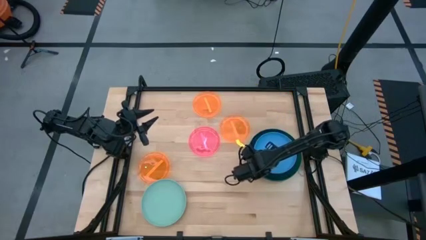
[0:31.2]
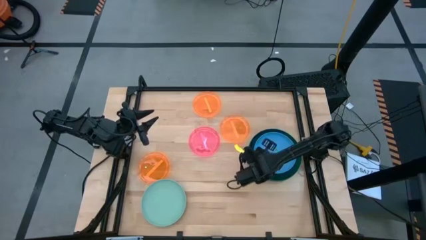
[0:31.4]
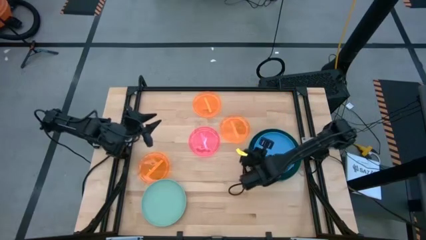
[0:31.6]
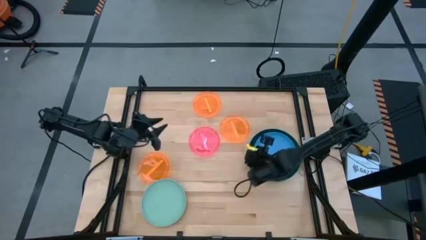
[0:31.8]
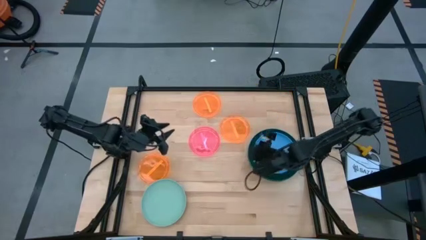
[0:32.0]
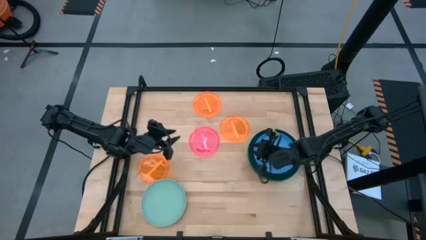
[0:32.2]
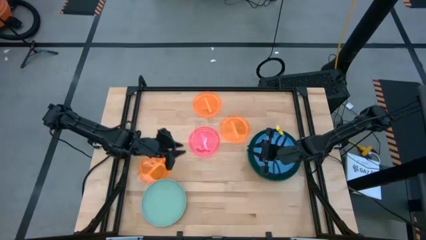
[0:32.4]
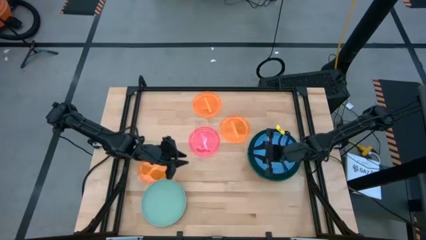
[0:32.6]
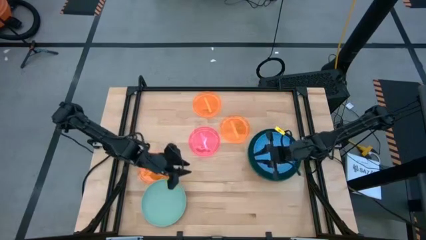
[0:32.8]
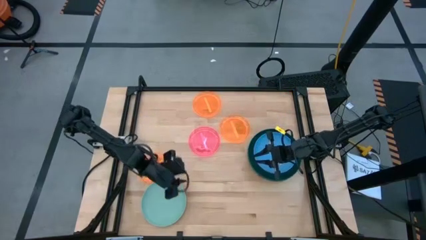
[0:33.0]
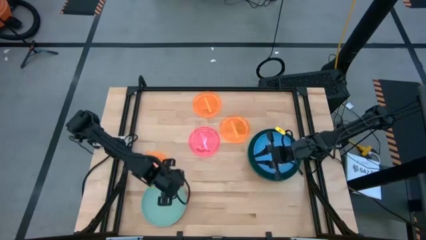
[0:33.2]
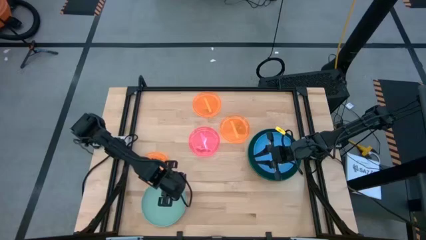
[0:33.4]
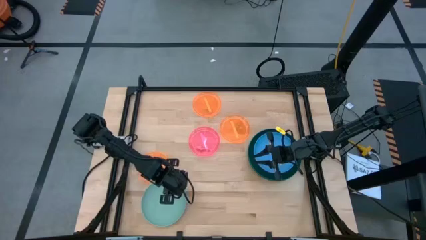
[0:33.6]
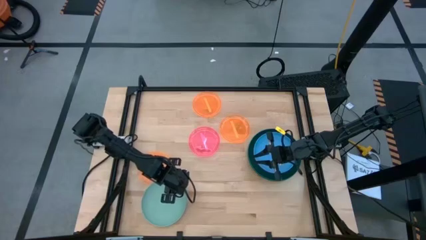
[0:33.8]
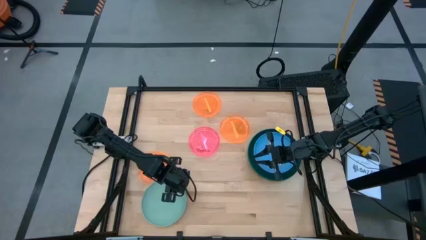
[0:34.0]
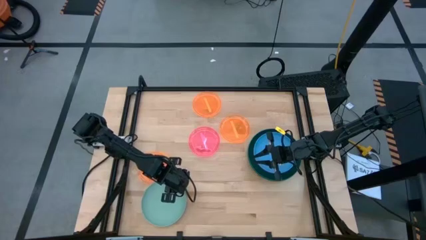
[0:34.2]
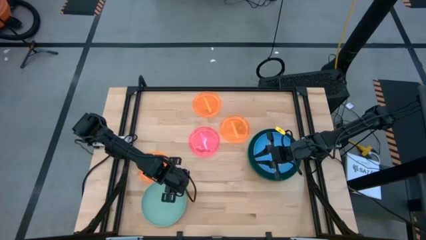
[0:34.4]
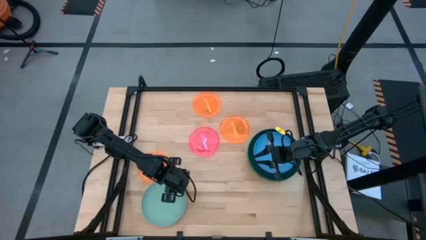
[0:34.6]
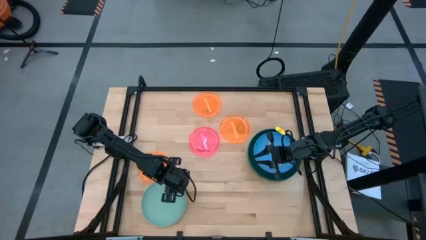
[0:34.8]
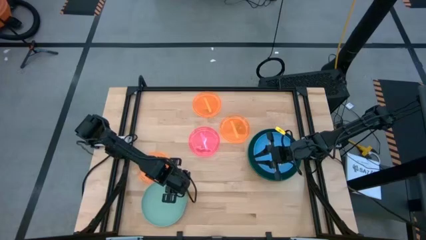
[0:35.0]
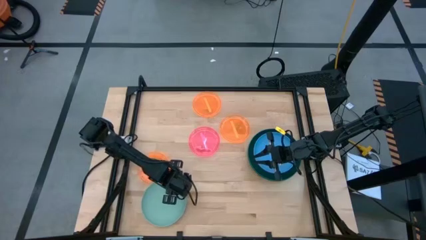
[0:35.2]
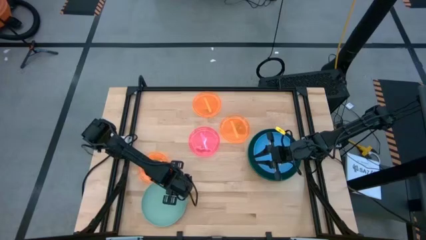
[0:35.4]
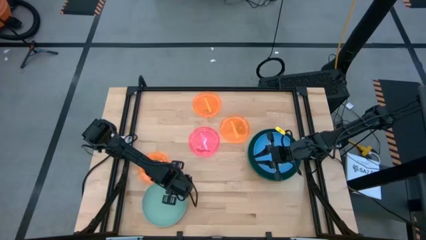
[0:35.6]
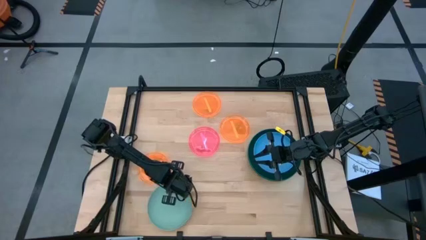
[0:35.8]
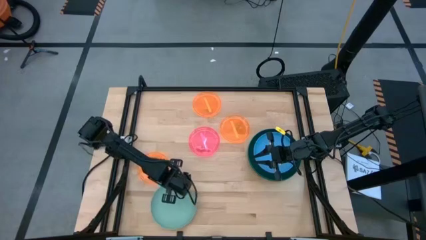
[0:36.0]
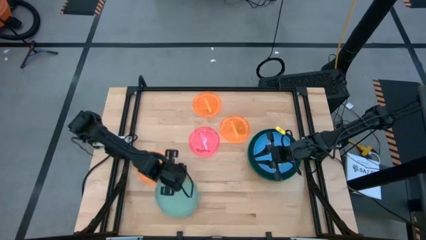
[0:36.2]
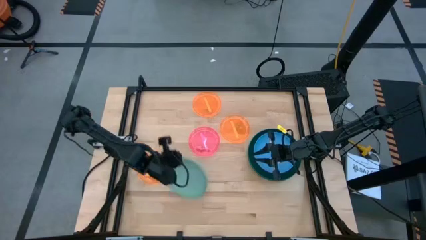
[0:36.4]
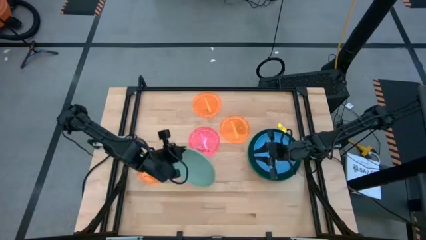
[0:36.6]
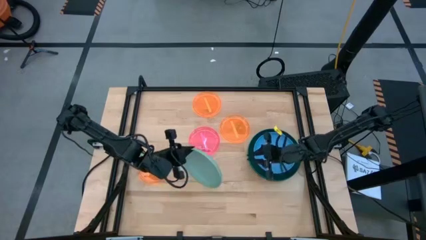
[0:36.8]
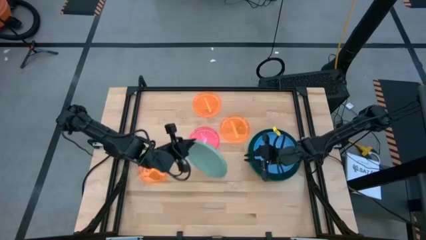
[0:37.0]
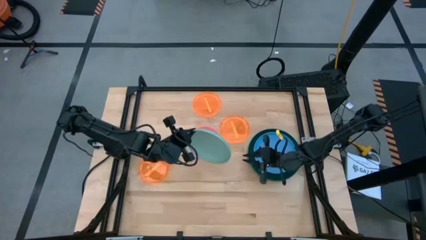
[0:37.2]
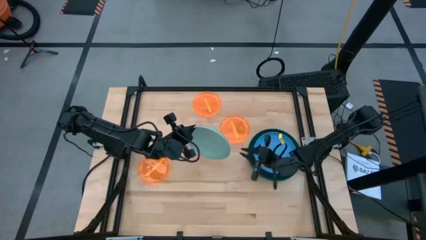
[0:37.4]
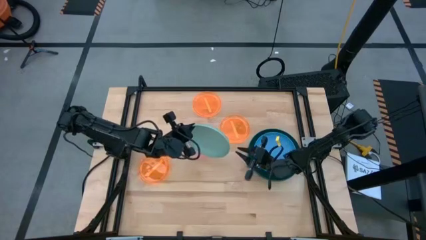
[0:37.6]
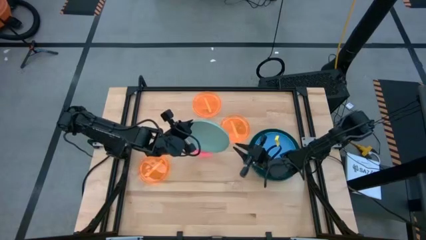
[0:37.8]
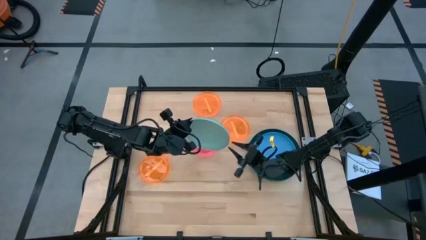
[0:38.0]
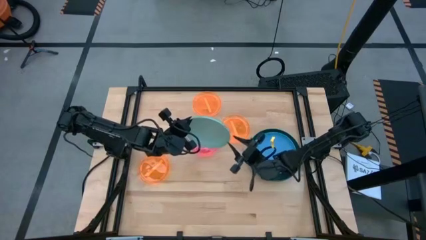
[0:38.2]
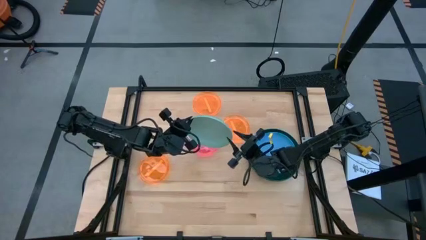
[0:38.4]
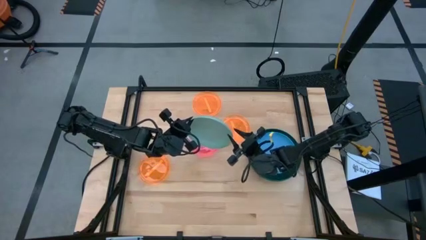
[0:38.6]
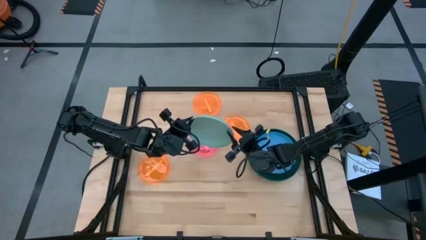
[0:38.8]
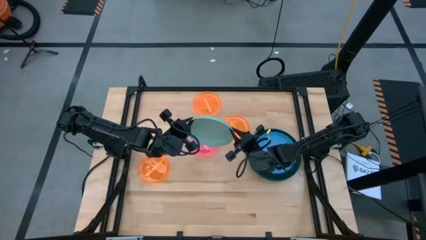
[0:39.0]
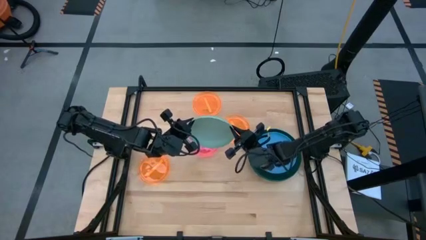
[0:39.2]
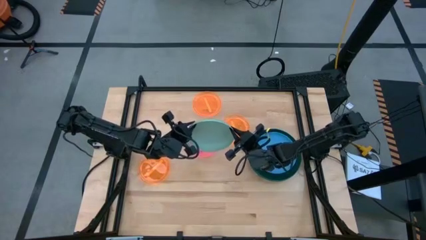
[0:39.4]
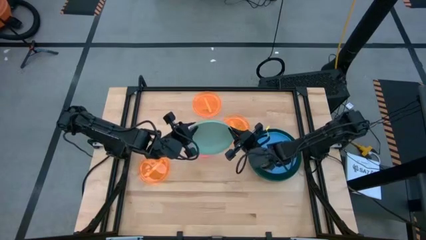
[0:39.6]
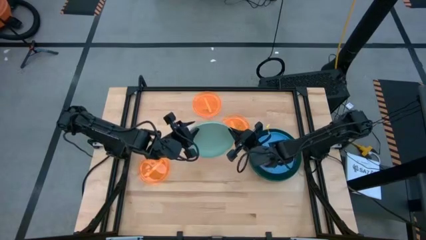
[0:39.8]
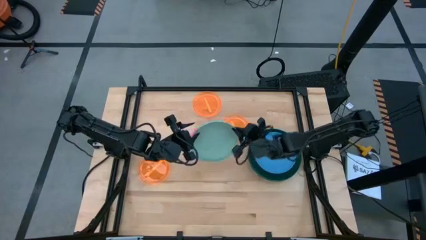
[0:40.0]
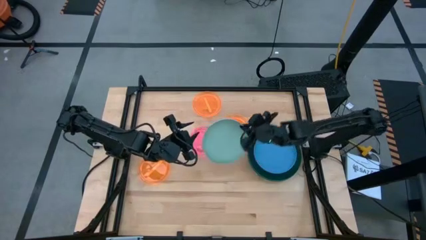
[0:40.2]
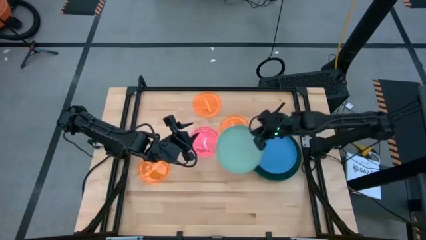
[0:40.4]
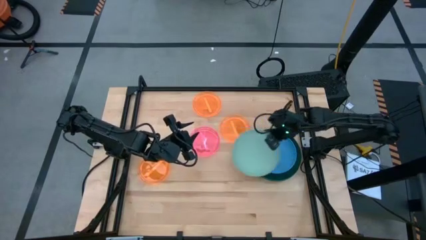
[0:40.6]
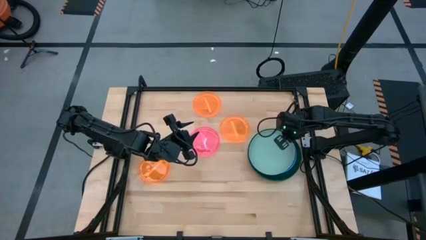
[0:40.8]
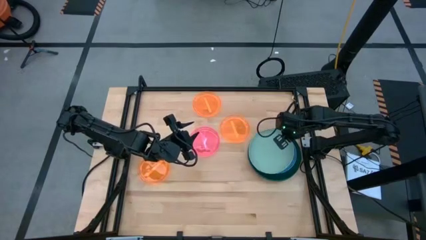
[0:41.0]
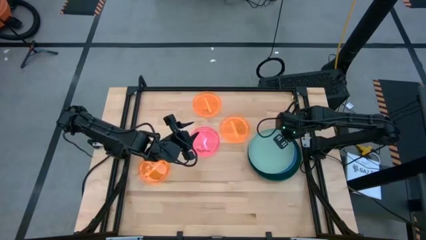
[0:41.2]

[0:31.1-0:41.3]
Task: Stack plastic plates
Stack the light green plate on top of the blue plate

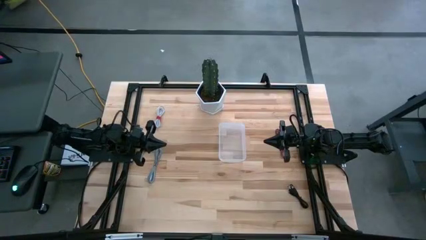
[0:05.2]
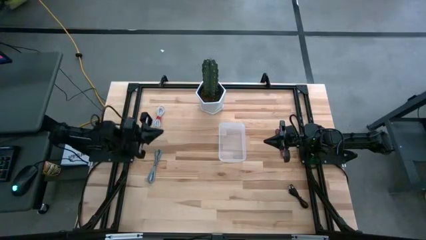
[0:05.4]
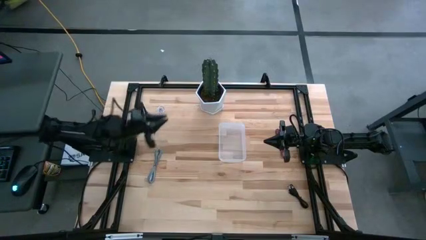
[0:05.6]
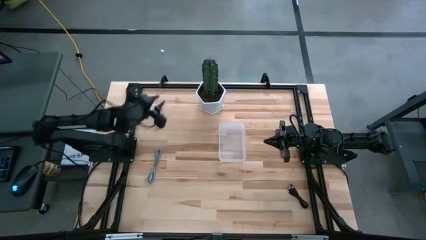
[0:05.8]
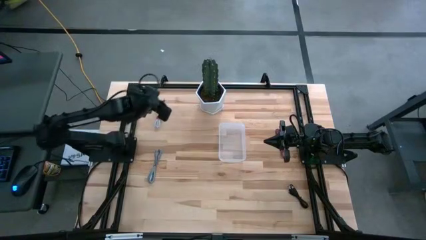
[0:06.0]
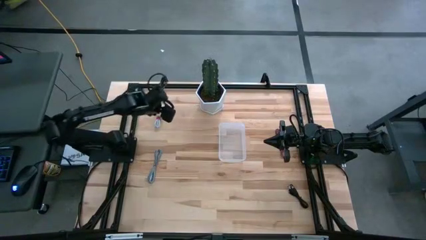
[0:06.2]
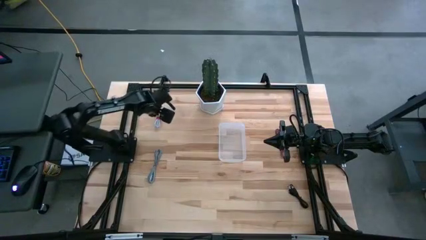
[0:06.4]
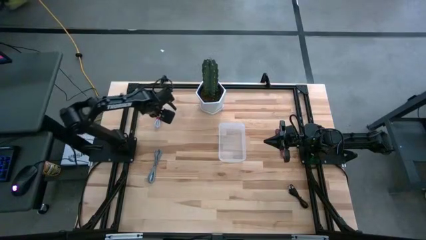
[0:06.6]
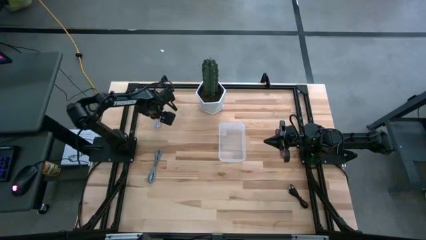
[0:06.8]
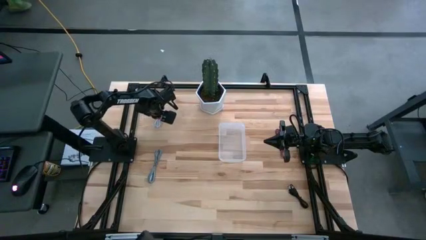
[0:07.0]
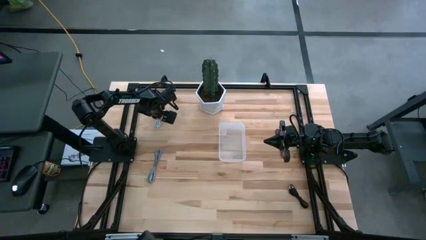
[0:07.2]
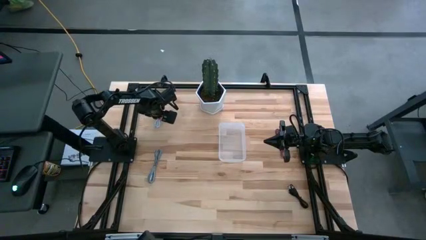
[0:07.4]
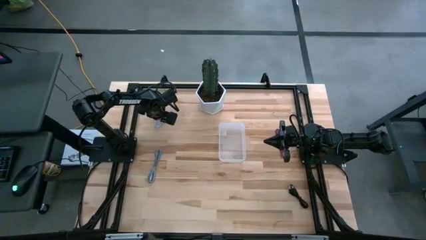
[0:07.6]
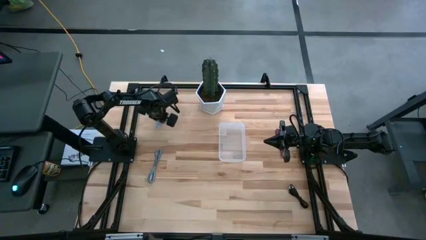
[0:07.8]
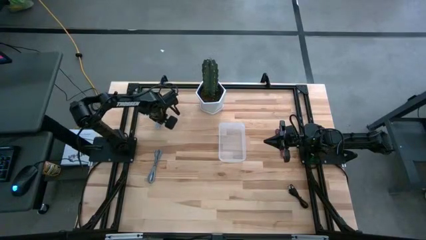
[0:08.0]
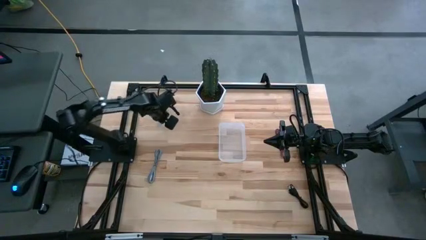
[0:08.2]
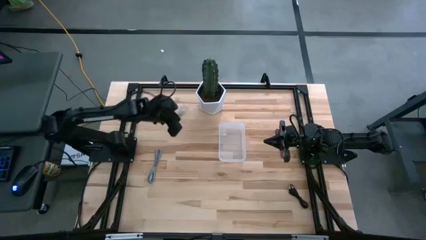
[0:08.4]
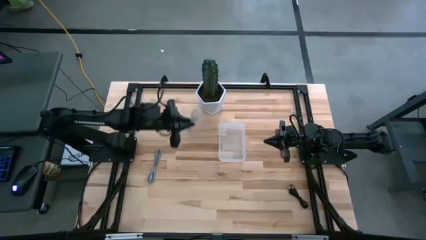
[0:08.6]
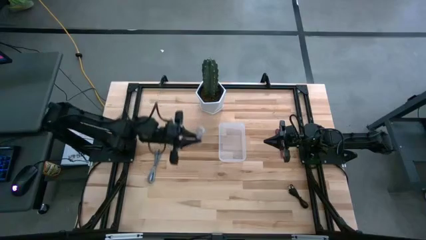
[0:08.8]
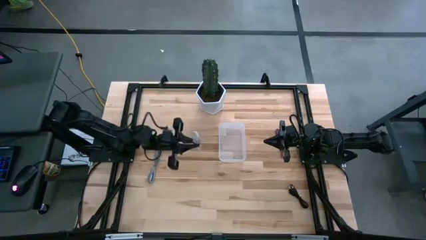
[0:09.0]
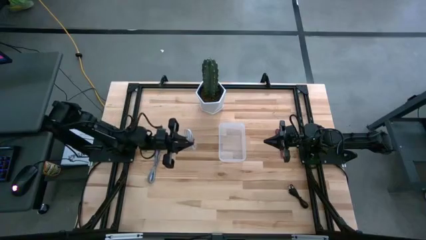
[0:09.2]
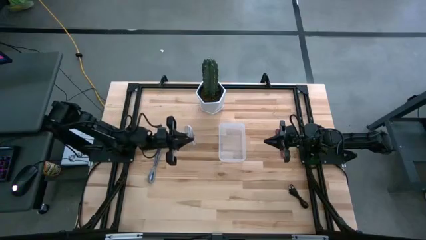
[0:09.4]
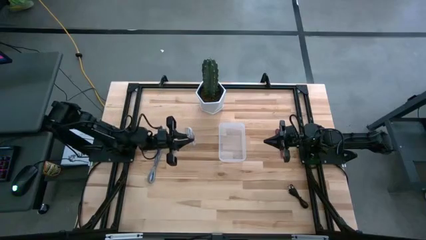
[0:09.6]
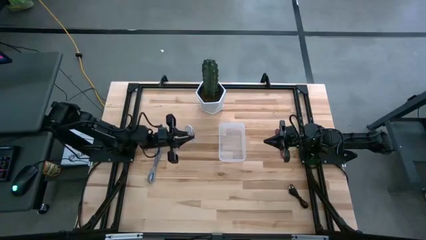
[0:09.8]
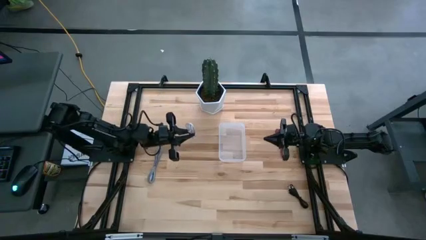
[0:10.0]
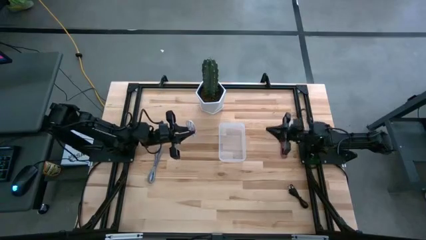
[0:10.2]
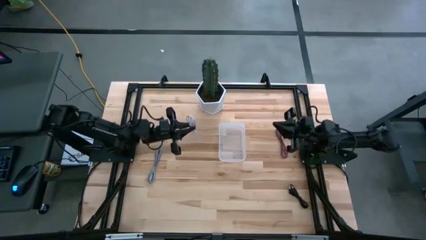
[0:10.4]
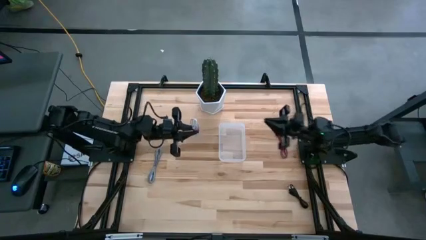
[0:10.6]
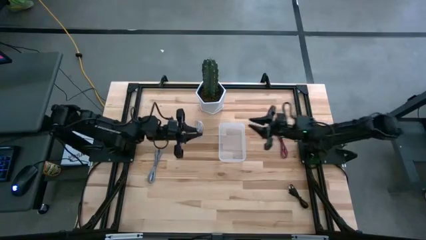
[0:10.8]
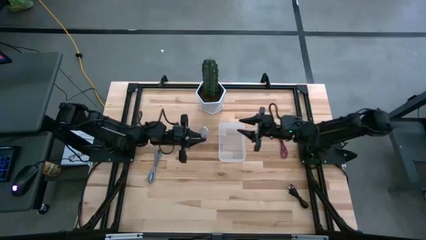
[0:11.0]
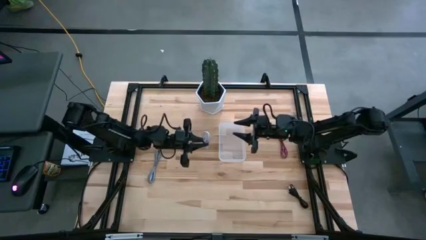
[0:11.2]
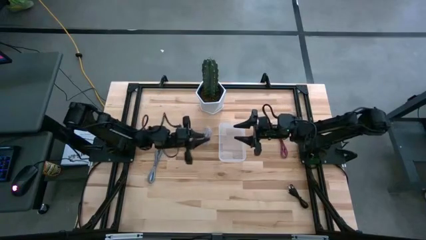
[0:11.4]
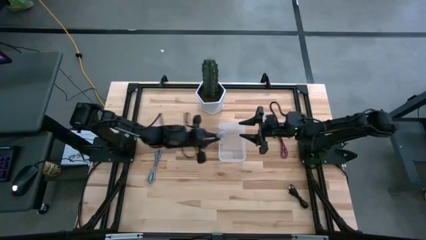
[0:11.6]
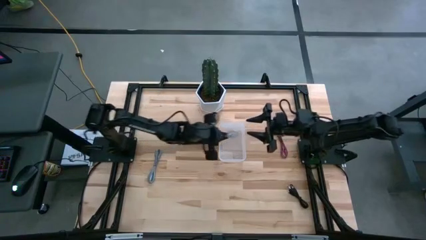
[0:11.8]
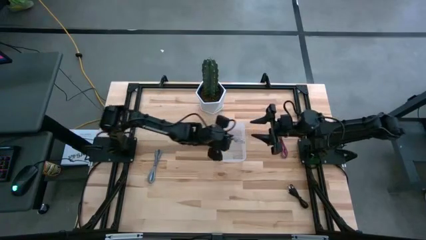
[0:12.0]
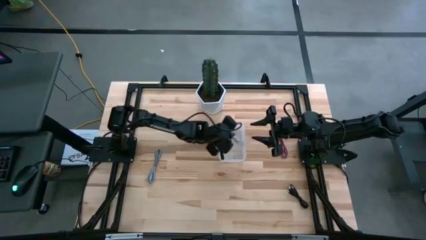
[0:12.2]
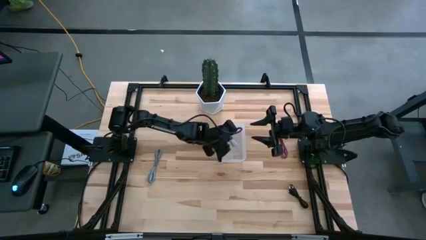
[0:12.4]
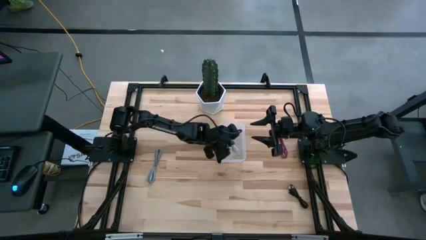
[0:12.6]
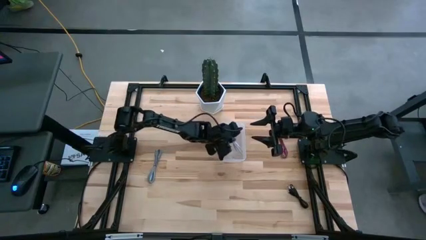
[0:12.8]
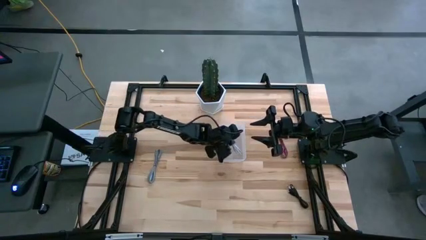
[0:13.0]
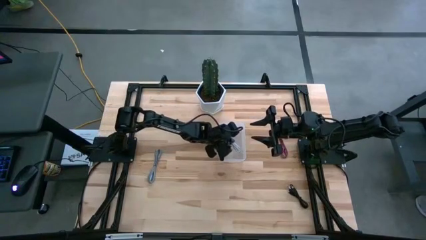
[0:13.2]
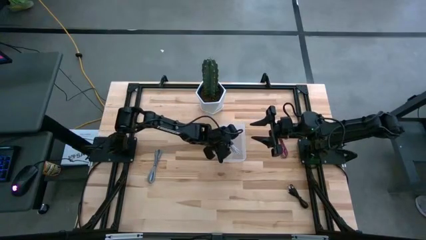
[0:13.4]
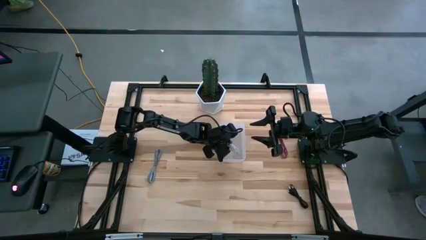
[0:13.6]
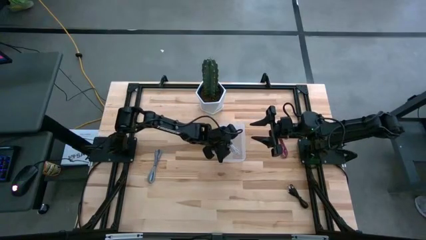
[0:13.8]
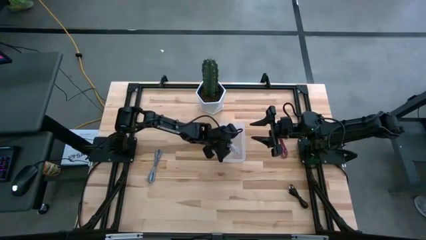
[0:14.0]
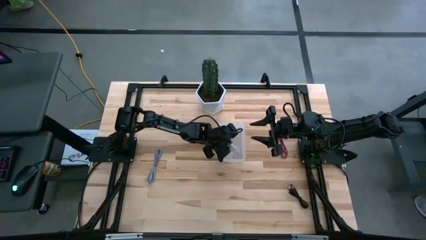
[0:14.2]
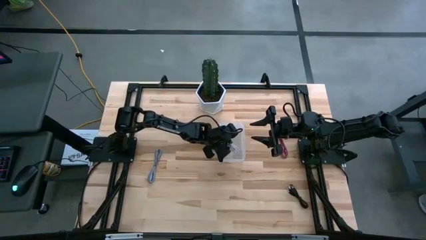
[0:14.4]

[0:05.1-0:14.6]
Task: Pick and place USB-C Cables
Put the white charger cable into the transparent bin
